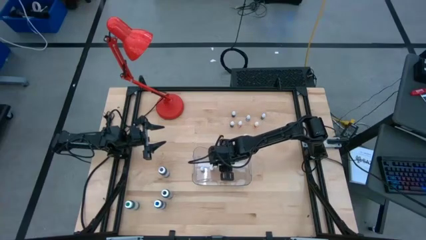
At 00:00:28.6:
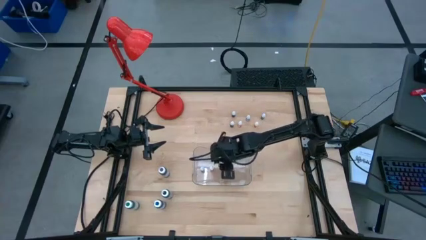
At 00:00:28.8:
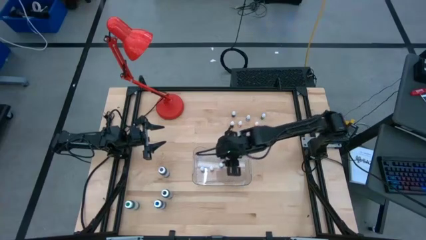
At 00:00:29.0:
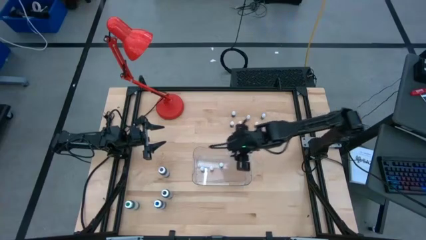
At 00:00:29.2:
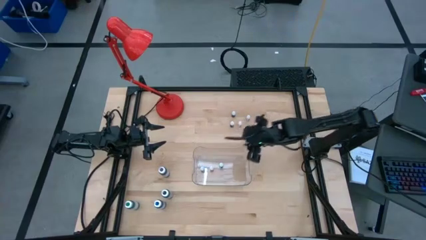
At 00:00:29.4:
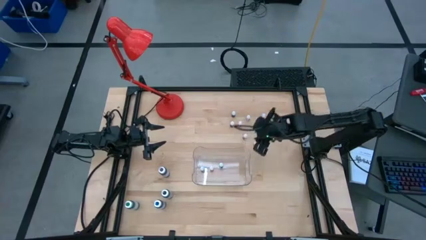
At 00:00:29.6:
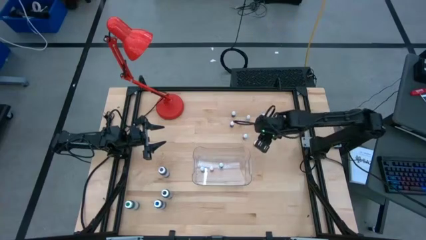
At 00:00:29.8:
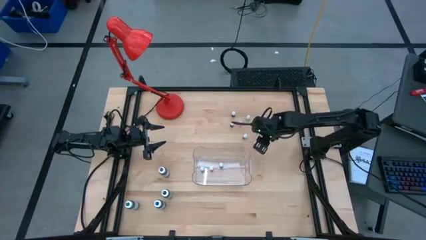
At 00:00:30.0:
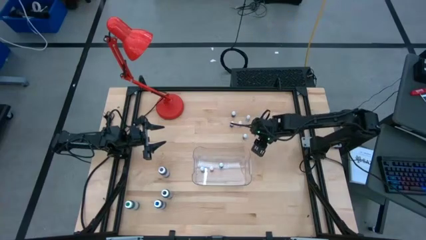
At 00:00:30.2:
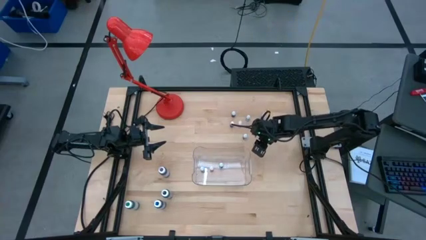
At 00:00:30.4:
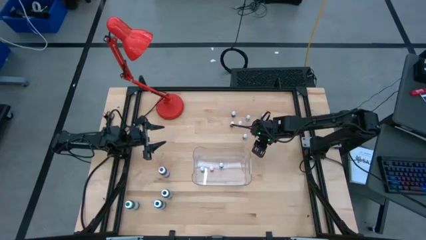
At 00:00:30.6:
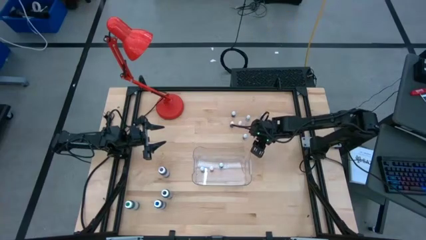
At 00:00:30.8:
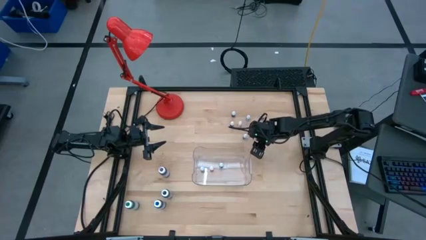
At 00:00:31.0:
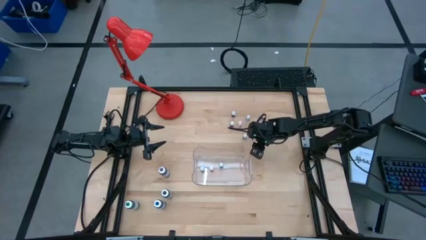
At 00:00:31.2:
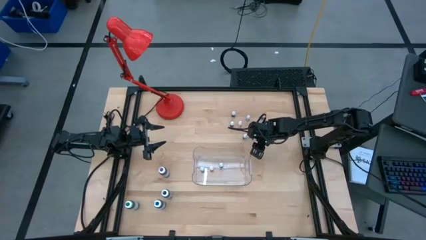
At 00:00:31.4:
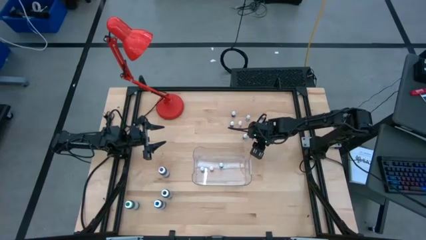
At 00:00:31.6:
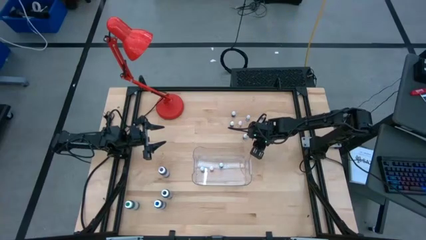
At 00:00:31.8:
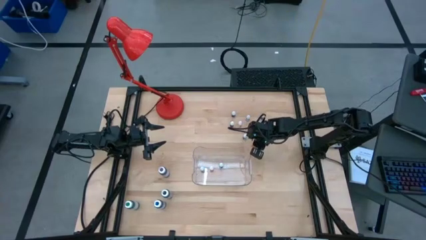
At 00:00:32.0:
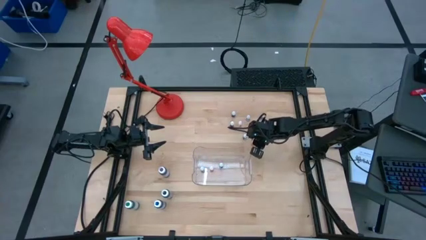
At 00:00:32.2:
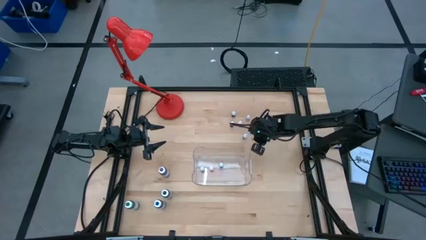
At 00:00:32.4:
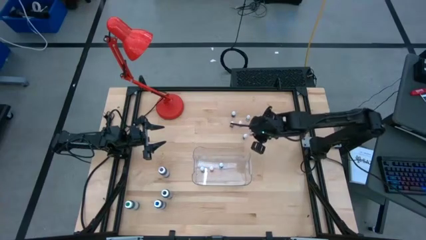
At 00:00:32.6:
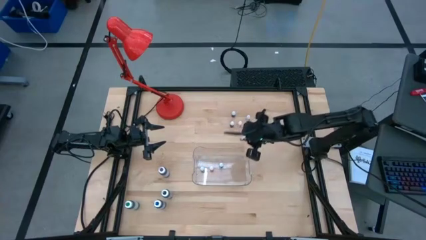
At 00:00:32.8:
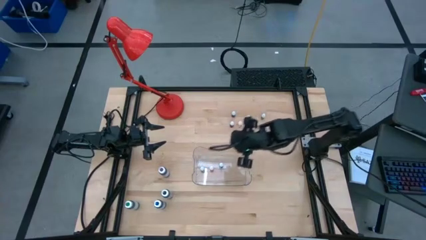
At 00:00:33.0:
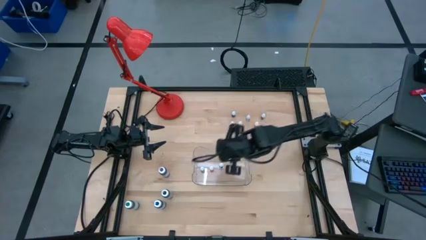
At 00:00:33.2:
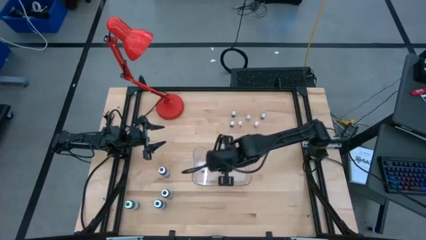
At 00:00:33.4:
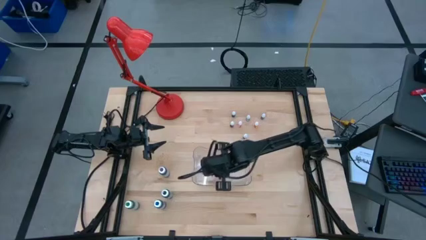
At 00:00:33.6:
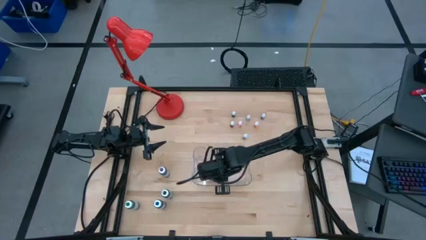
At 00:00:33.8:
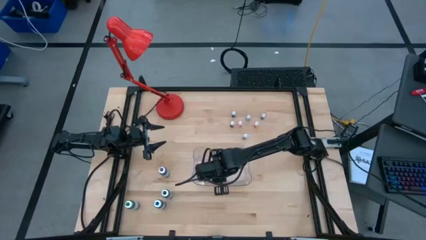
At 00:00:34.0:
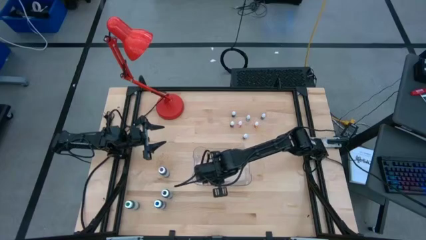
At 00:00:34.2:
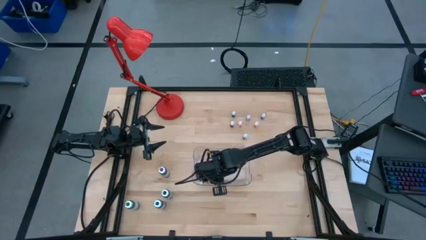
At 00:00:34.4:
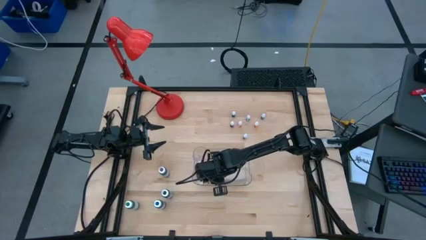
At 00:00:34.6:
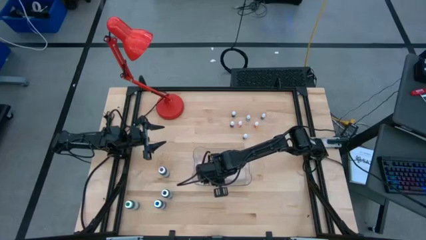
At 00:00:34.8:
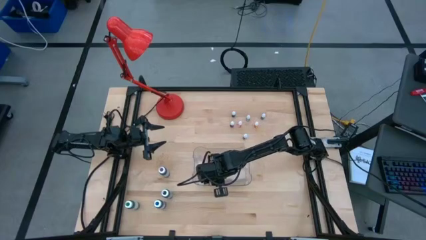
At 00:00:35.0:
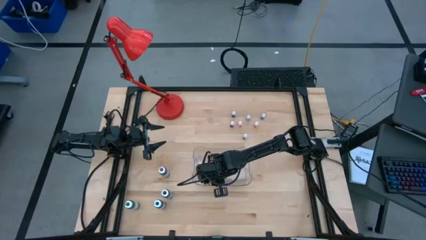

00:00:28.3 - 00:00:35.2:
Task: Pick & Place food coloring
Put the orange food coloring bottle into the transparent bin

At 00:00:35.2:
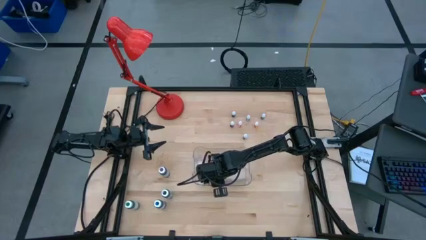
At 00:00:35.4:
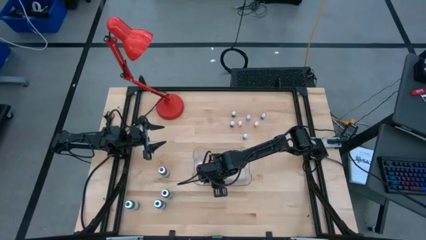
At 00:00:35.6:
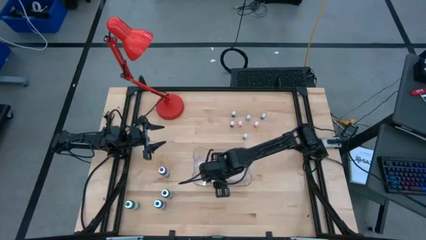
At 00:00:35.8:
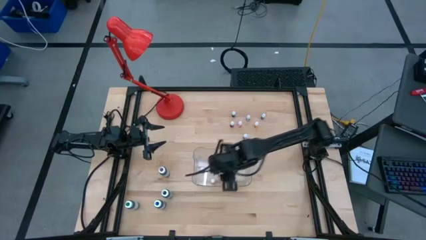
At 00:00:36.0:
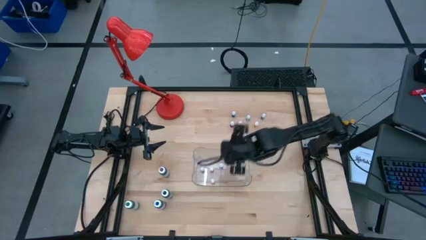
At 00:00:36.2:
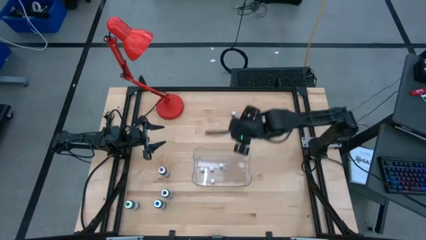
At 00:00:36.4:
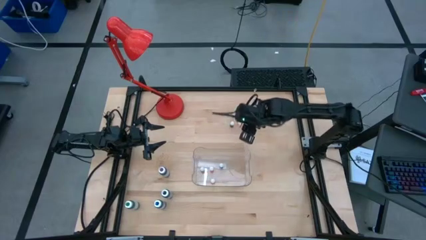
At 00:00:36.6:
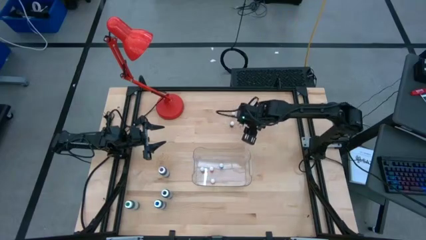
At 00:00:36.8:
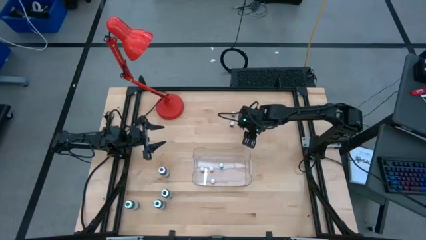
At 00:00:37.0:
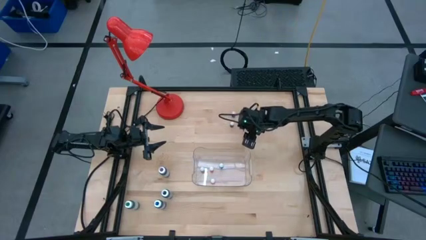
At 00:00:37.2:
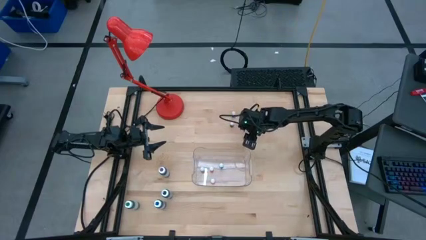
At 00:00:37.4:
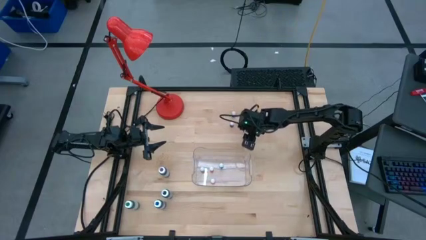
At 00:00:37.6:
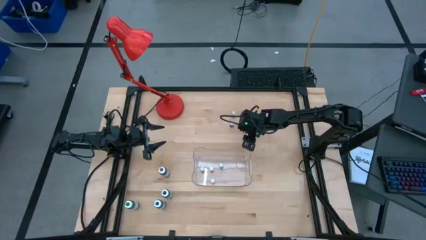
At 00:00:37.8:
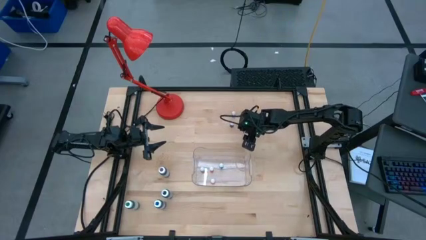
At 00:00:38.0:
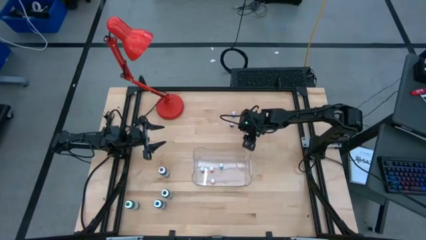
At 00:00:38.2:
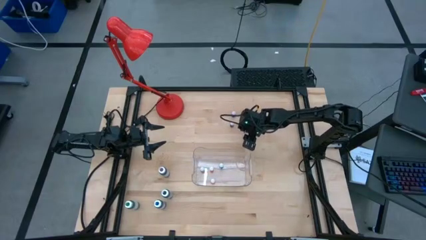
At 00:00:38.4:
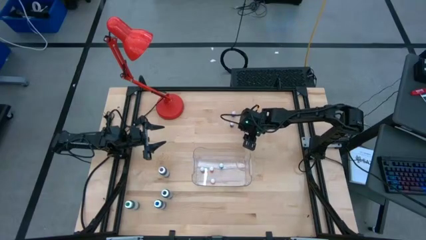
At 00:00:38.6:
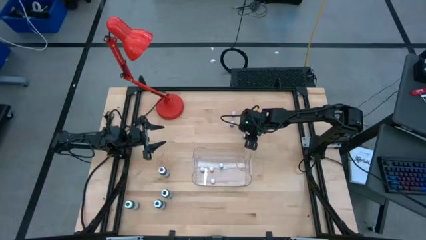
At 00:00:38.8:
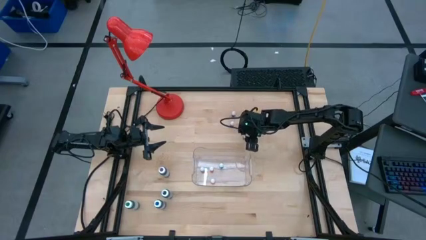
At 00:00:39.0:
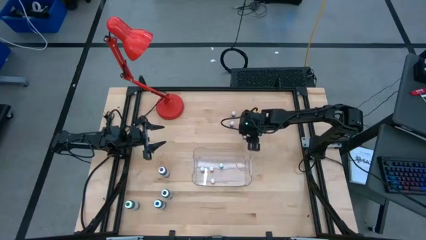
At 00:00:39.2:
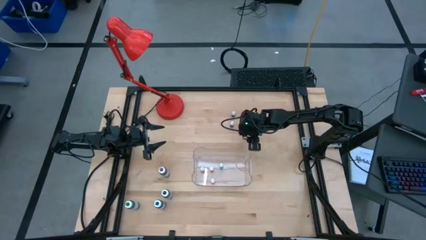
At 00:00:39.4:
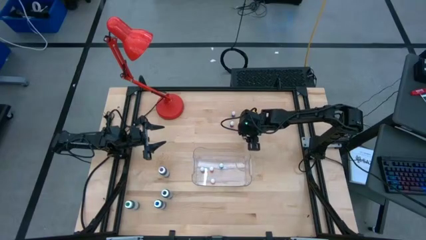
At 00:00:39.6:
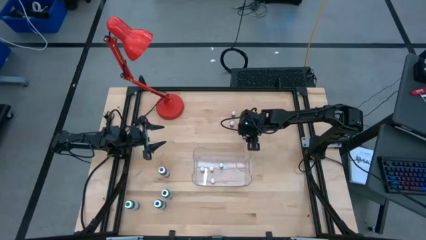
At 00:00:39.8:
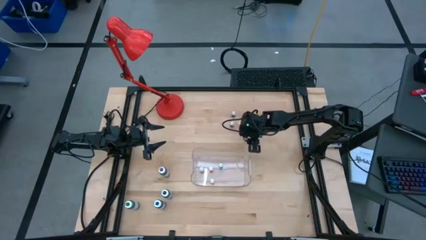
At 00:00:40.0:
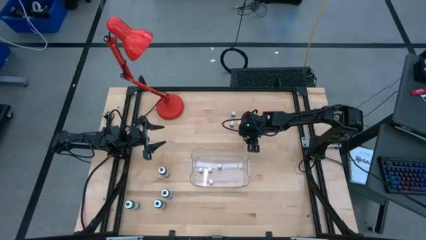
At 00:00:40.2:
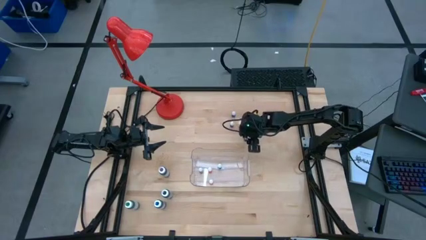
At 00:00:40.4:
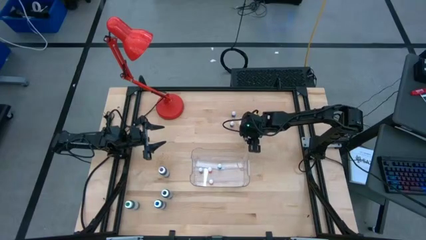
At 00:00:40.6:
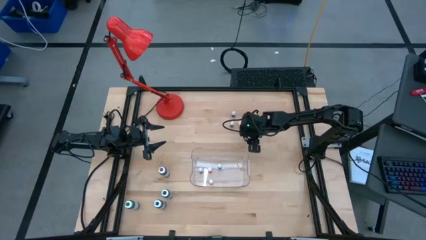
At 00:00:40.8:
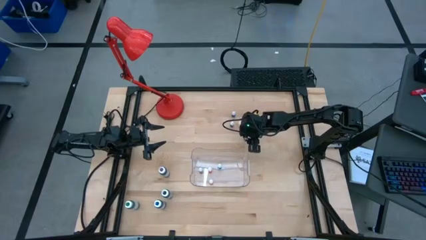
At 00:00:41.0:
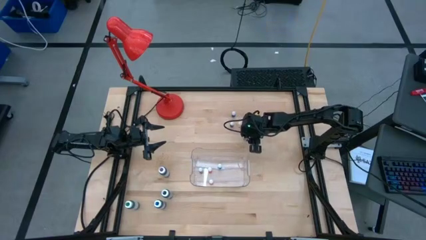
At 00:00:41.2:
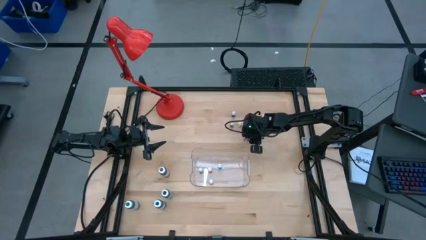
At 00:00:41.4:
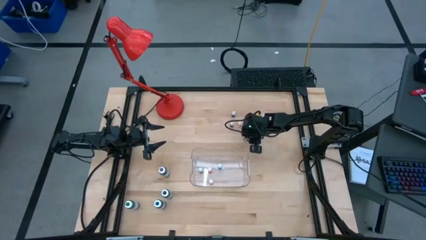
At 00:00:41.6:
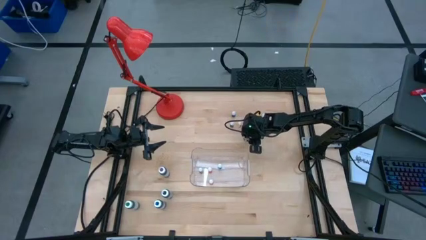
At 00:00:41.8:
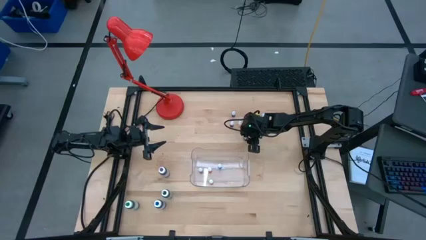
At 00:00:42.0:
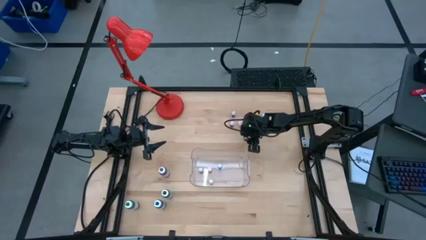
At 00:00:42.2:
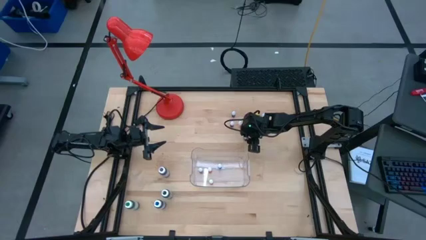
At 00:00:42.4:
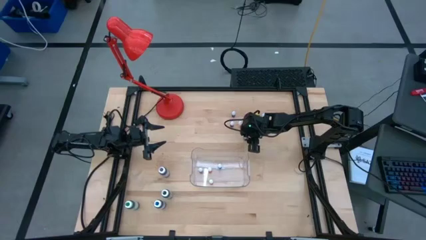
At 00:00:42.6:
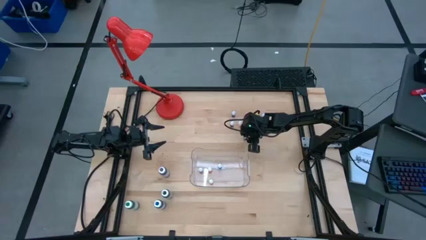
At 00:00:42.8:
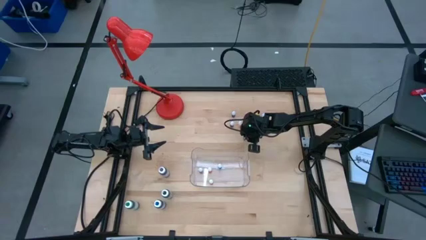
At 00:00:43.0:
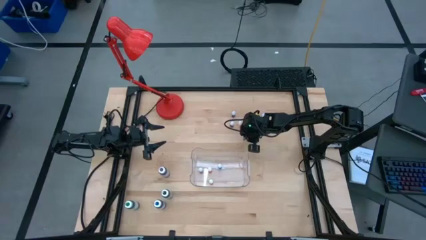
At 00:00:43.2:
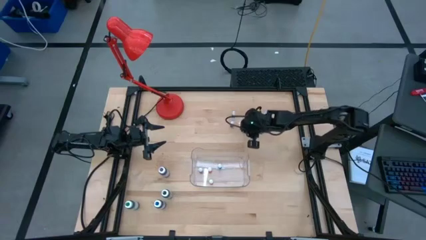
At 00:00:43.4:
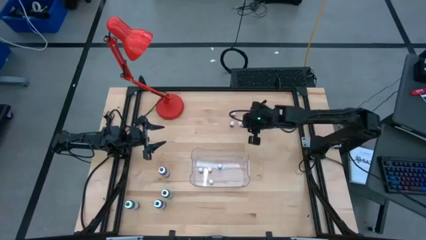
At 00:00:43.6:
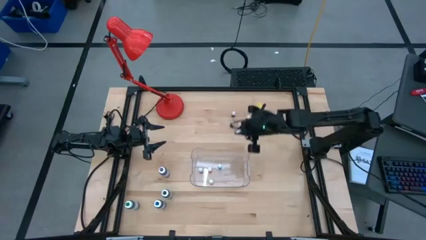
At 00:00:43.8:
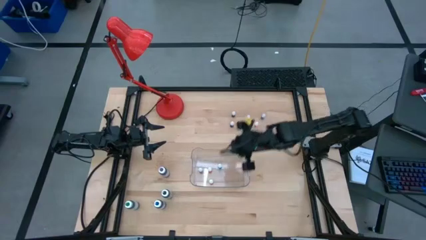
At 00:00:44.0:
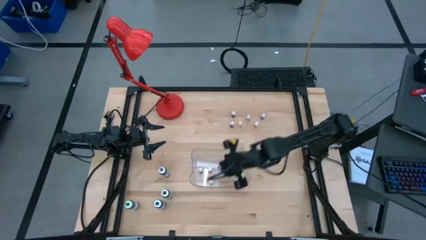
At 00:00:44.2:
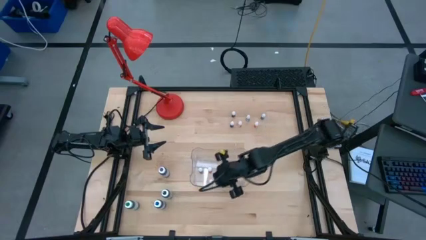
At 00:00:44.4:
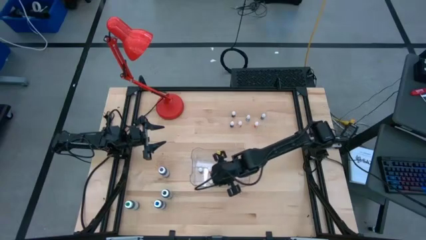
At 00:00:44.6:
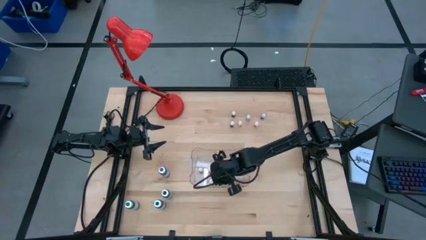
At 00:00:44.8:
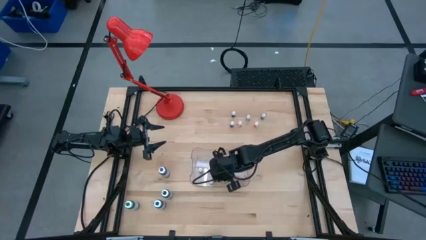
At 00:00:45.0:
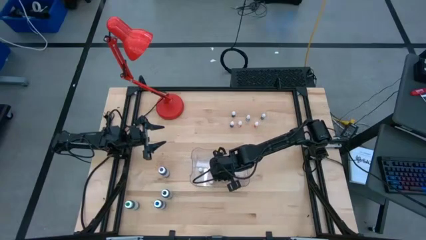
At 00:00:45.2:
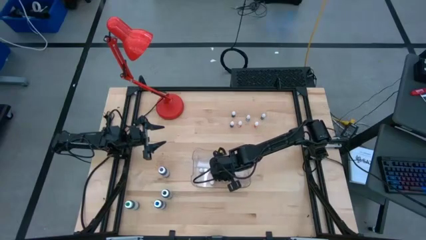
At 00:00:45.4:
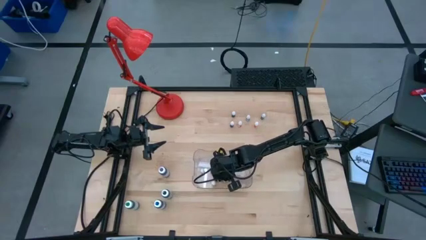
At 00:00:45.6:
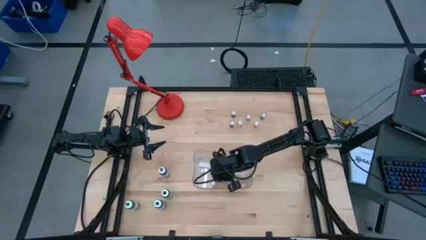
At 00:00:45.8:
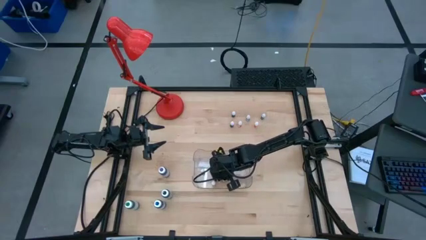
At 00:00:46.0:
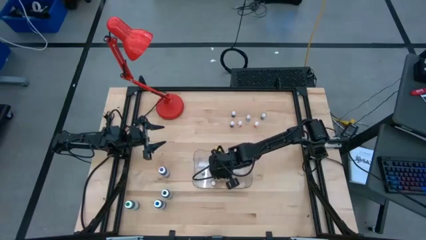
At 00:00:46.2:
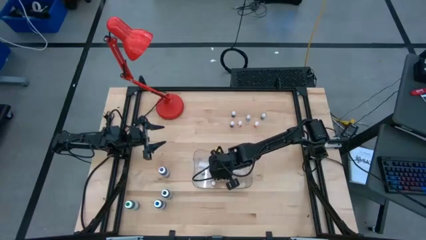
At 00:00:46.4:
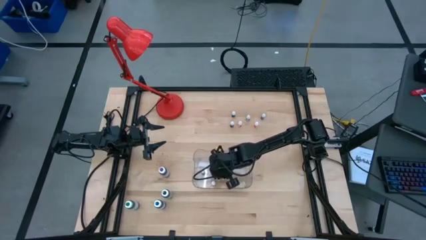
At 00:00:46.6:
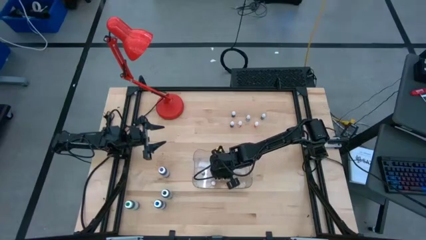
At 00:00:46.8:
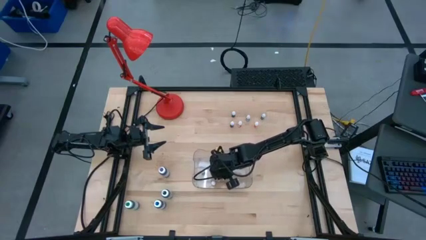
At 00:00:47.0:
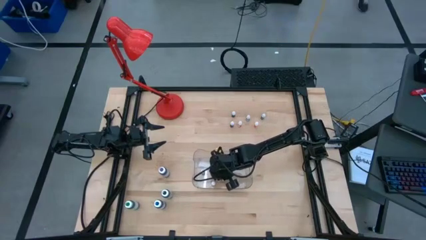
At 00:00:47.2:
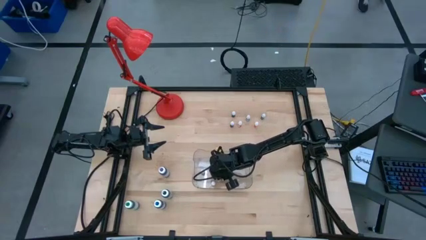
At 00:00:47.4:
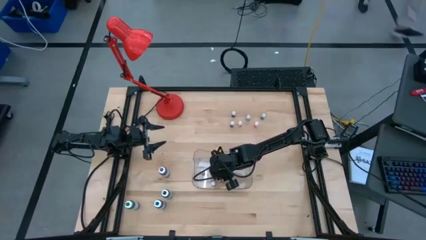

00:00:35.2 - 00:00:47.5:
Put the small purple food coloring bottle into the transparent bin
